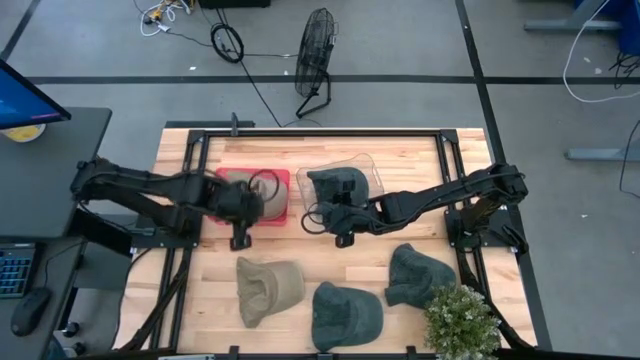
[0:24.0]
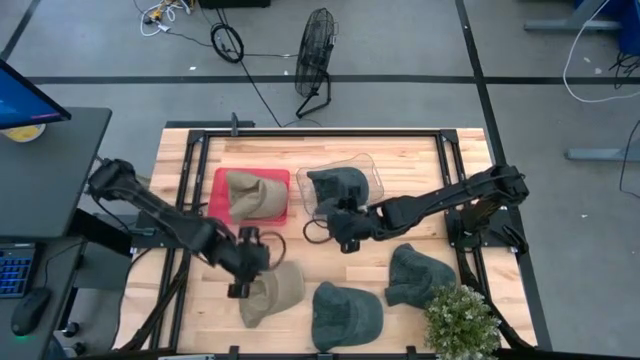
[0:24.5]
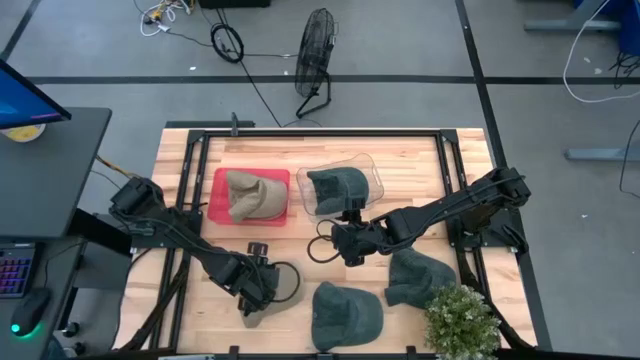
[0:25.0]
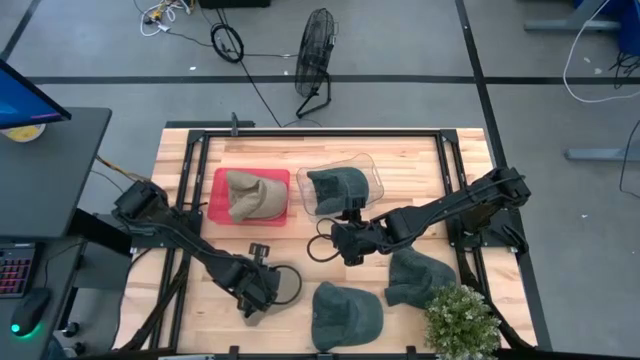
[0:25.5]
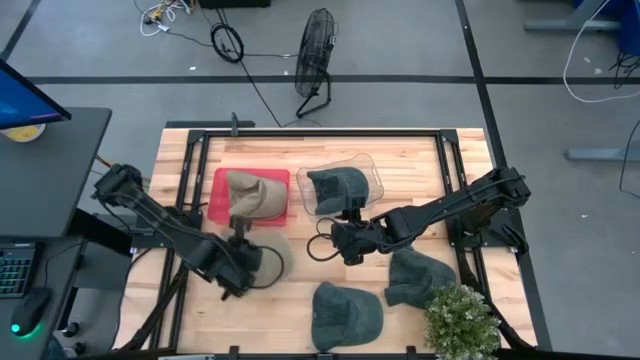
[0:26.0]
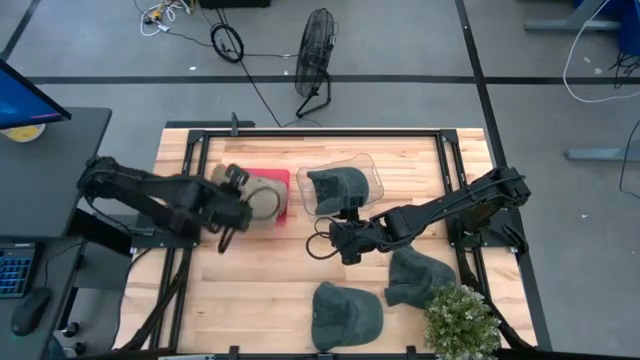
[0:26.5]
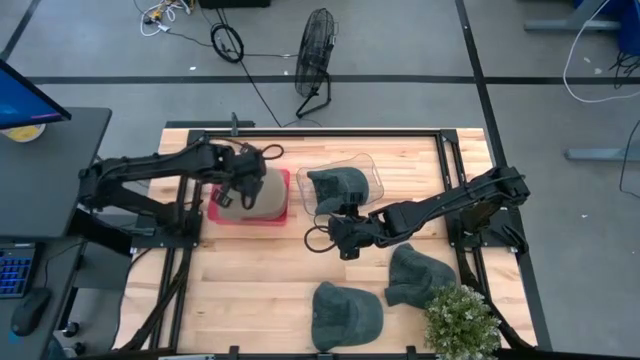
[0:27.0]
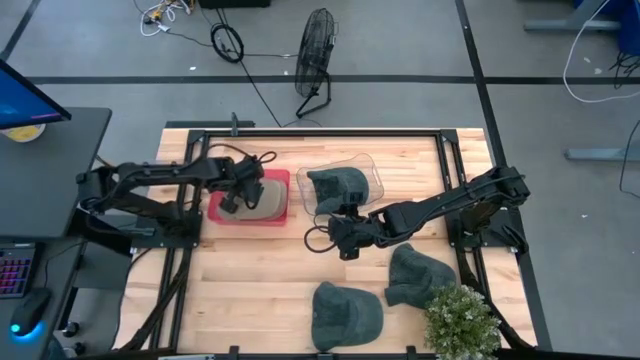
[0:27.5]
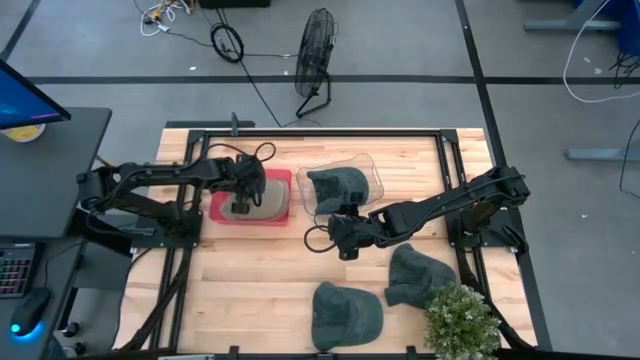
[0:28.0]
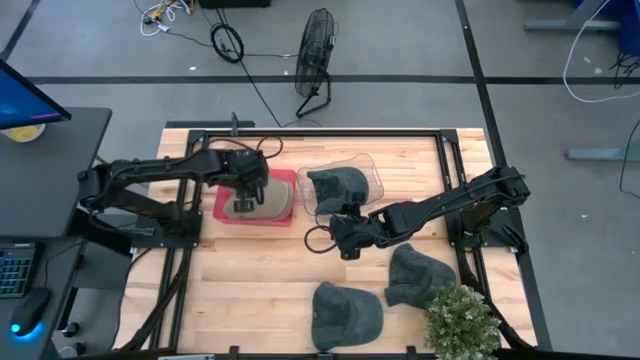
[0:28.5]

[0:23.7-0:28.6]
Task: Pick & Place hat
Put the brown cap into the red bin

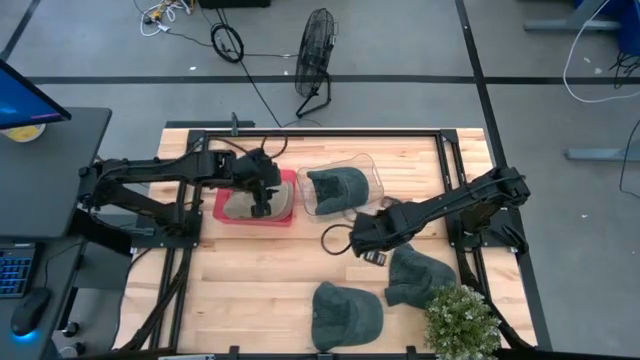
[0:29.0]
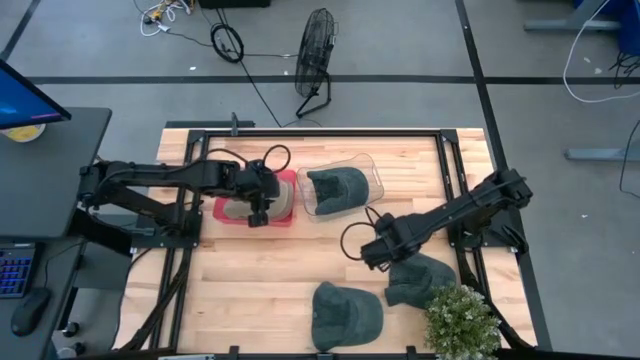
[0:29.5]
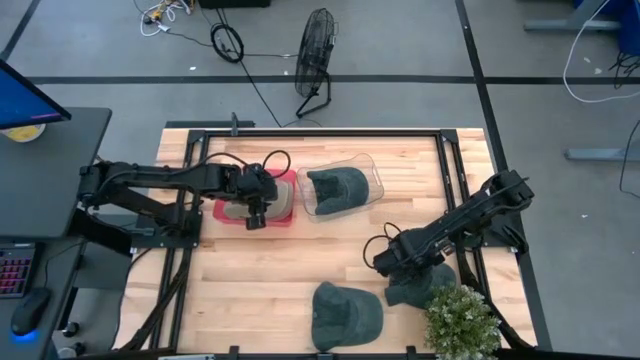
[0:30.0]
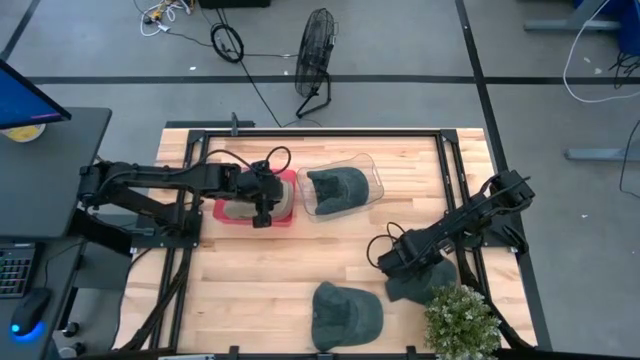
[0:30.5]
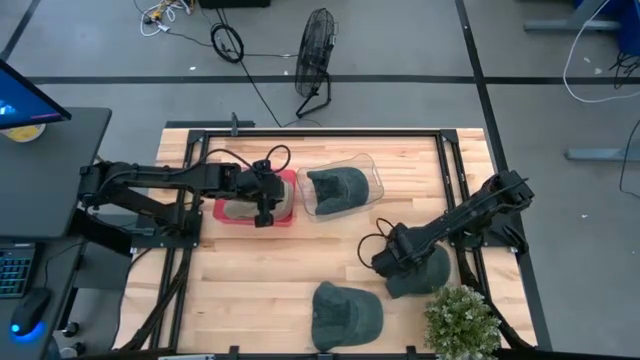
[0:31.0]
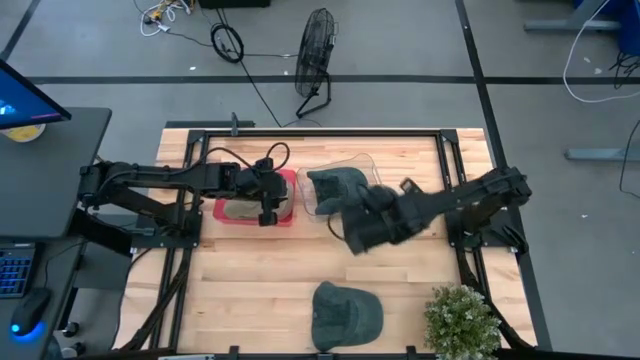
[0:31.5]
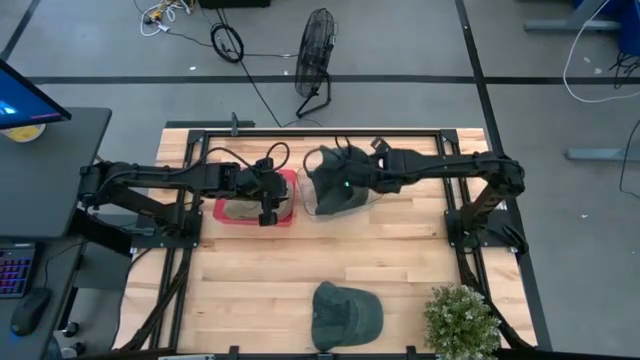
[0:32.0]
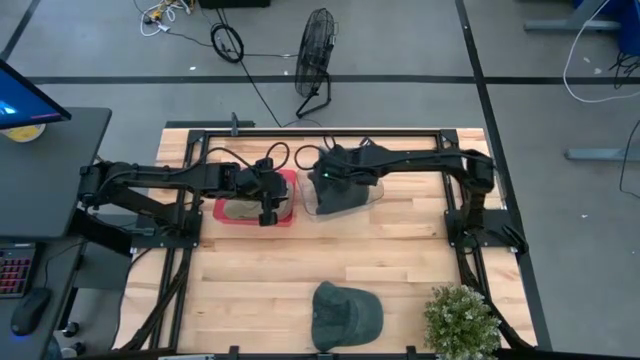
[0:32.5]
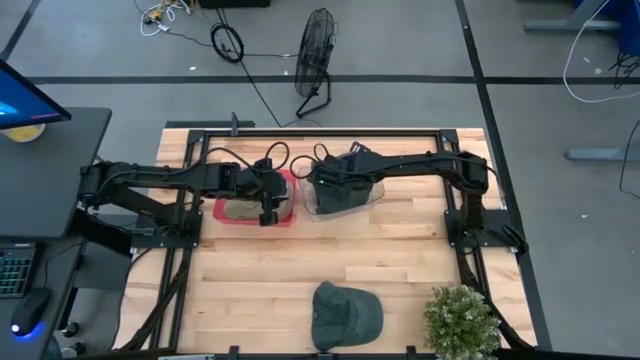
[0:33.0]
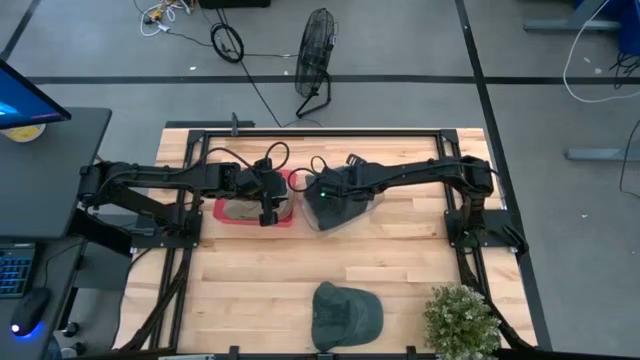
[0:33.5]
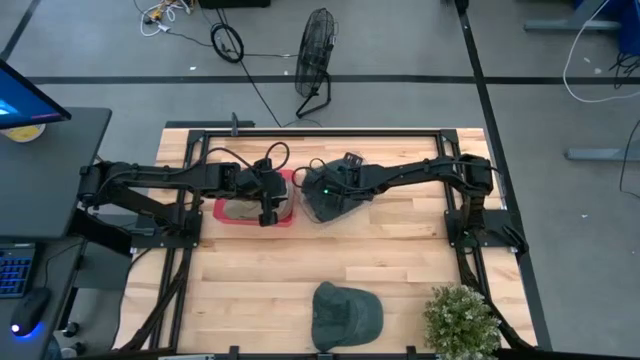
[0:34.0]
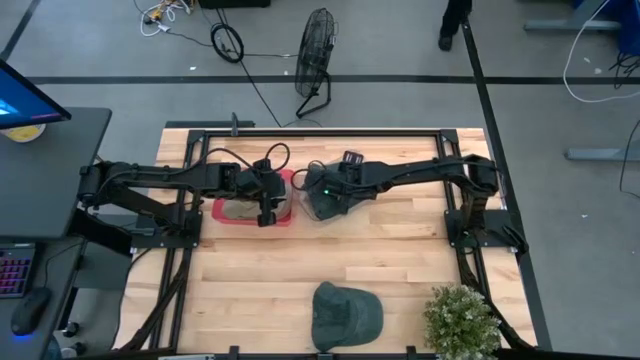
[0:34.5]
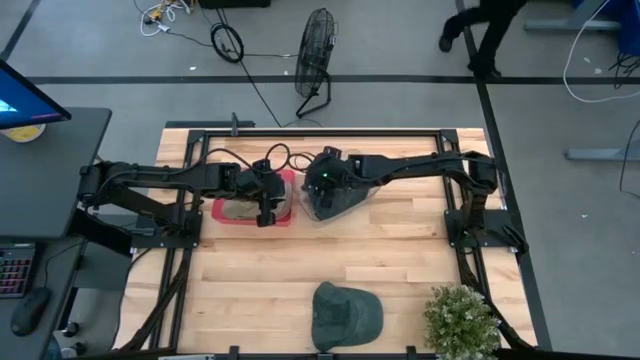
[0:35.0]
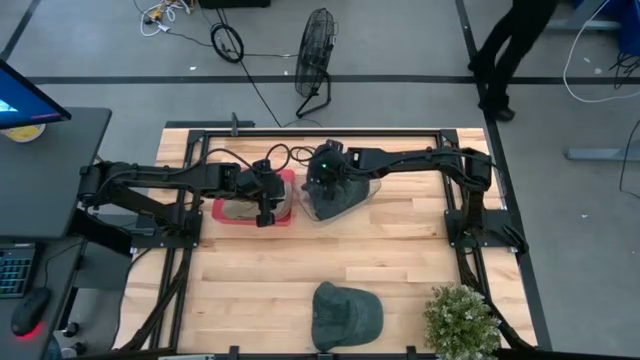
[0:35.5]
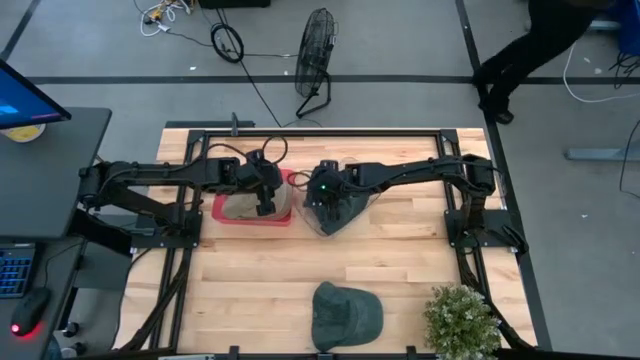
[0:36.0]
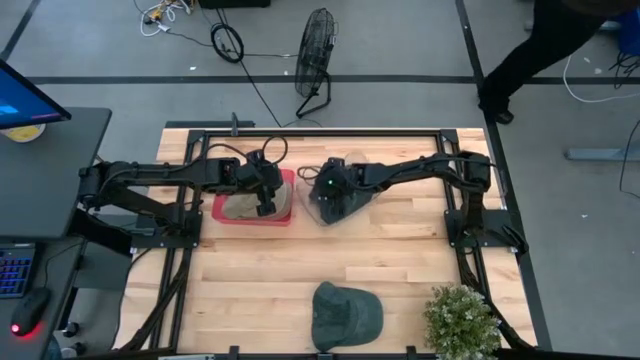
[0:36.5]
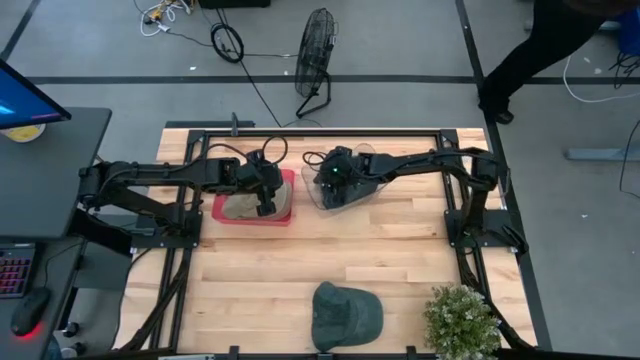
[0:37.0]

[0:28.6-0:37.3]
Put the top black cap into the transparent bin

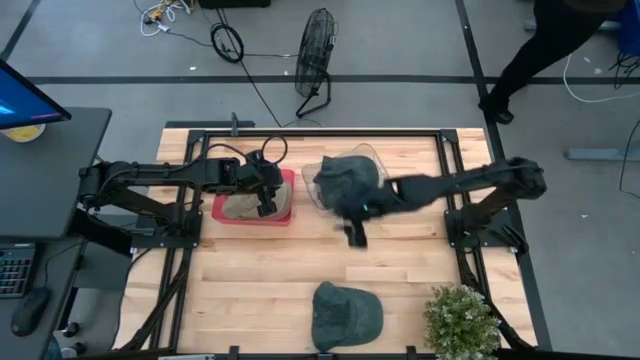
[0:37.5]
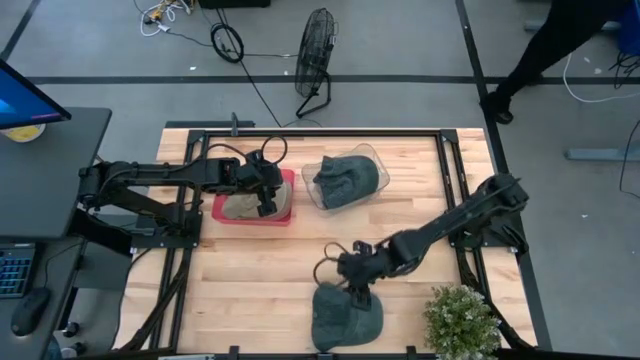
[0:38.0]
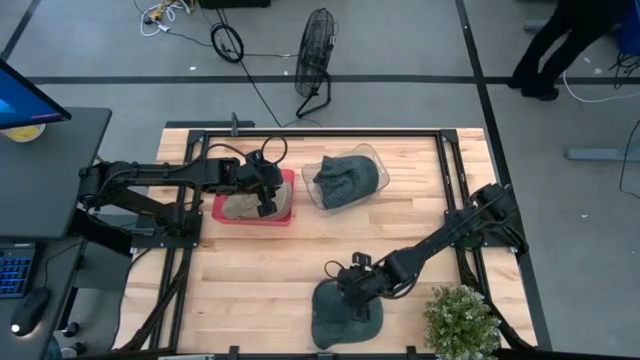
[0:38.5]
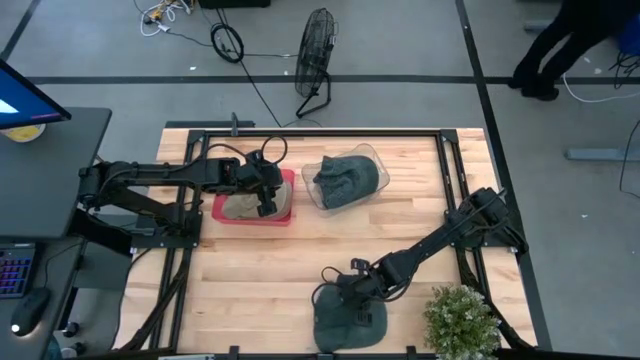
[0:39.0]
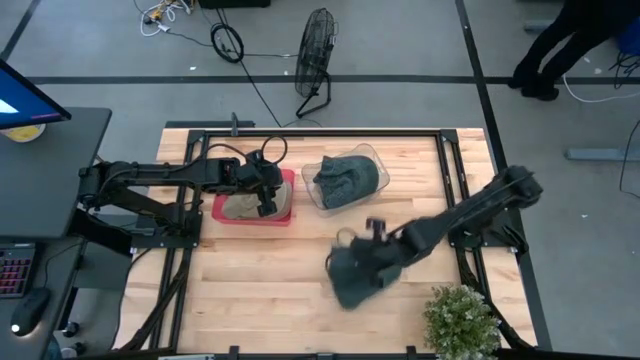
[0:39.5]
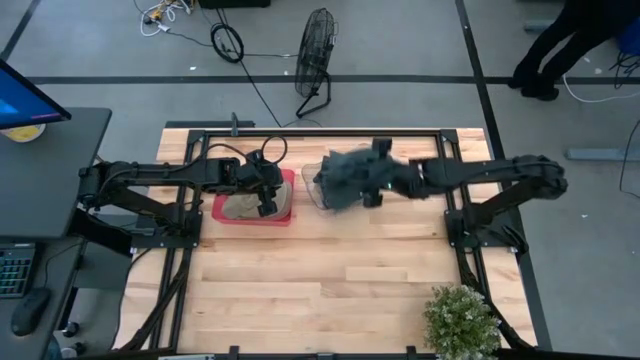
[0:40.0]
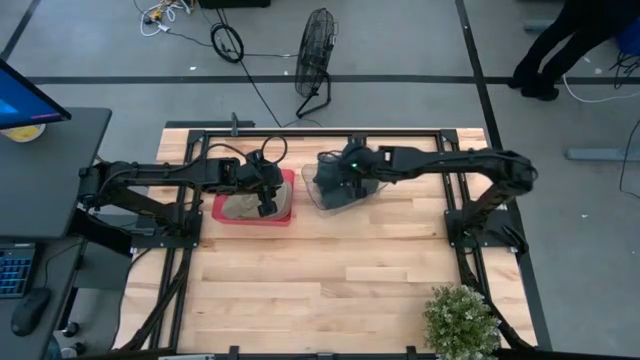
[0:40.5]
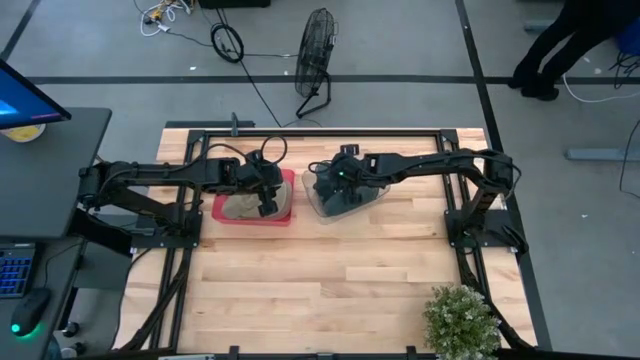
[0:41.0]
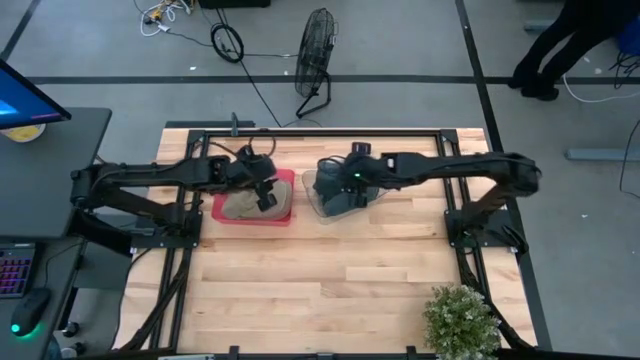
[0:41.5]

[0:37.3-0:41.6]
Put the black cap into the transparent bin

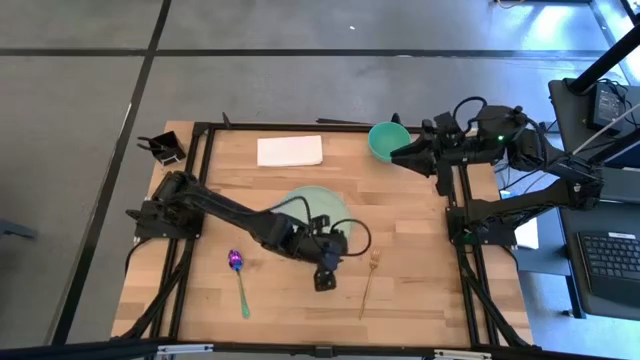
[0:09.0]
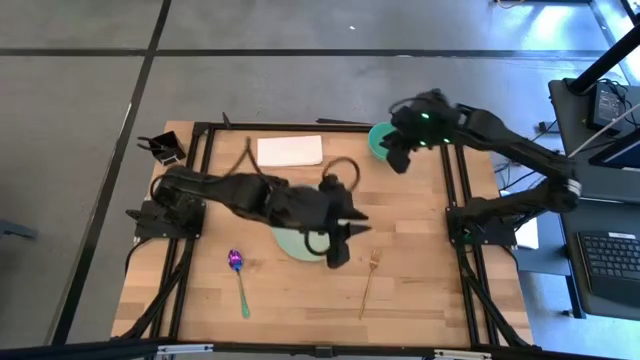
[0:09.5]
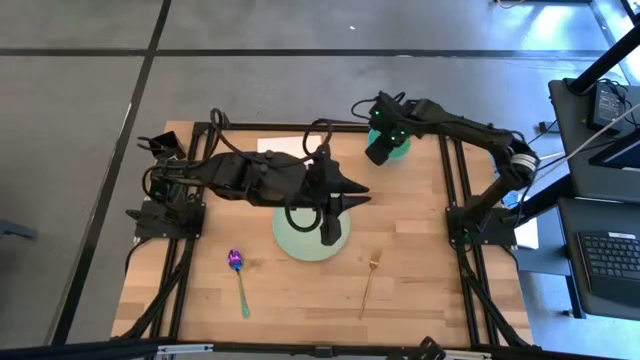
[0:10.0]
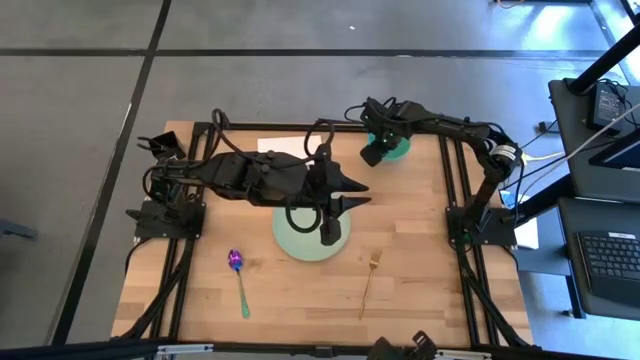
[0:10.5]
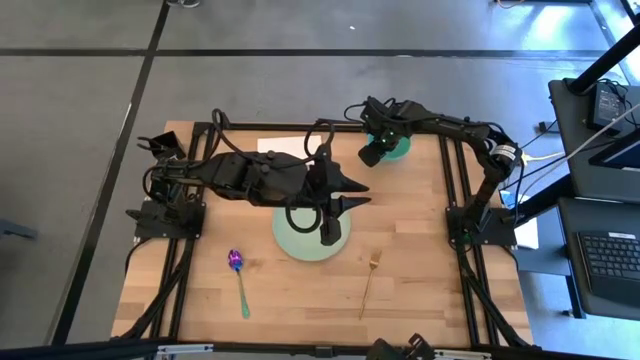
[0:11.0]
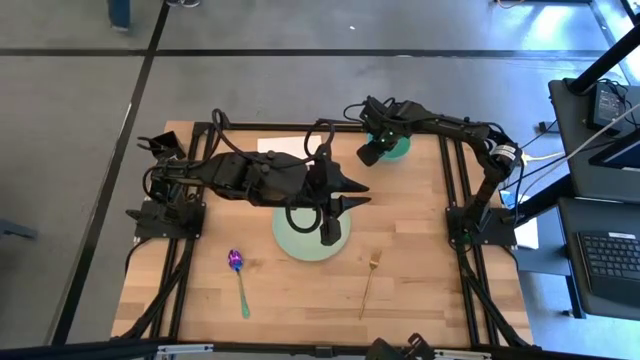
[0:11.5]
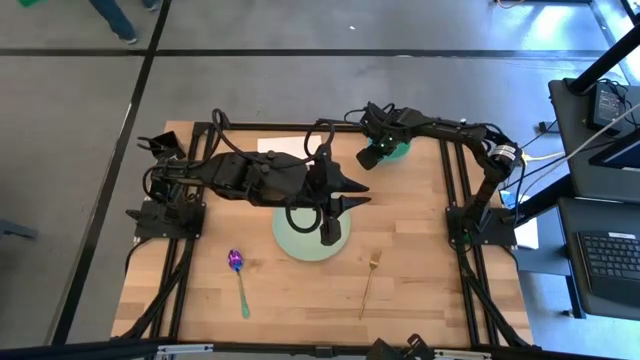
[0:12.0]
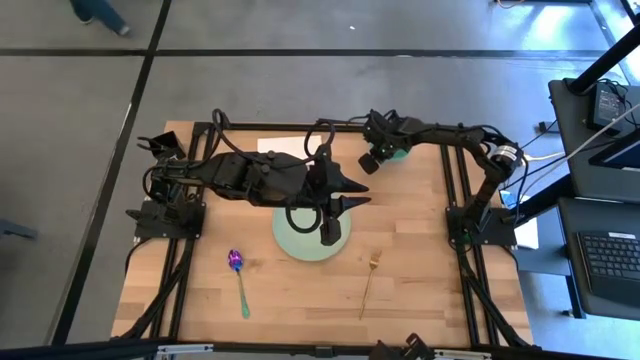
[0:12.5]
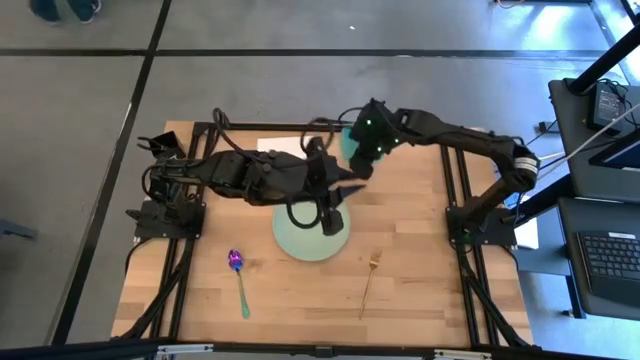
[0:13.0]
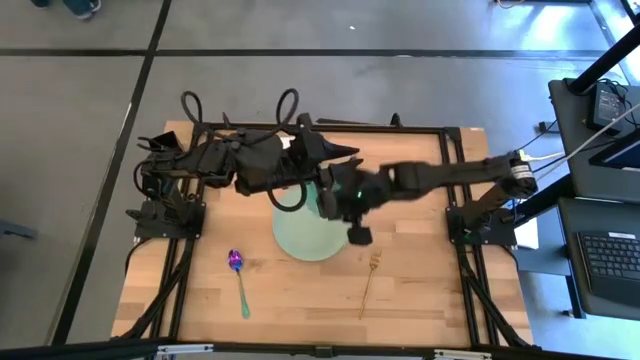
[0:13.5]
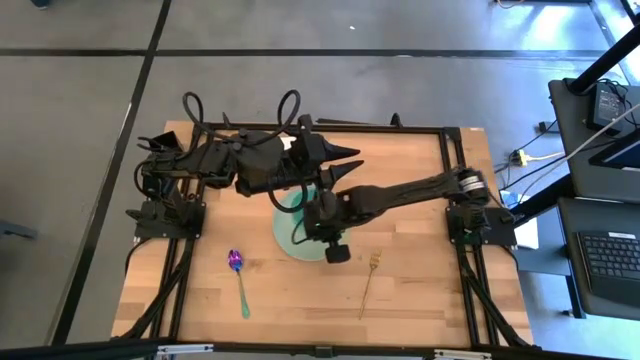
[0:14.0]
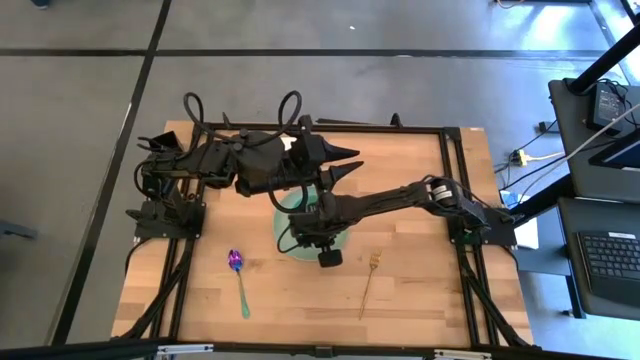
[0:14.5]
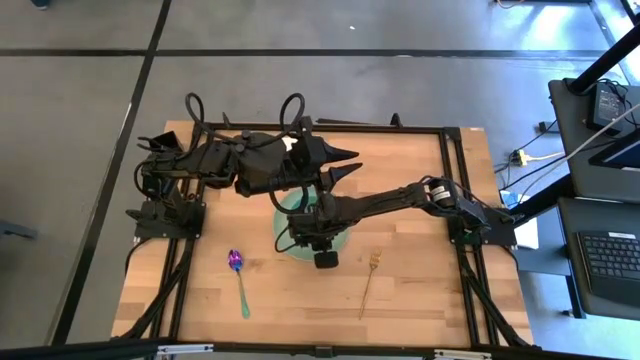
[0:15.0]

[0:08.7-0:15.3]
Task: Set table place
Put the blue bowl on top of the green plate
